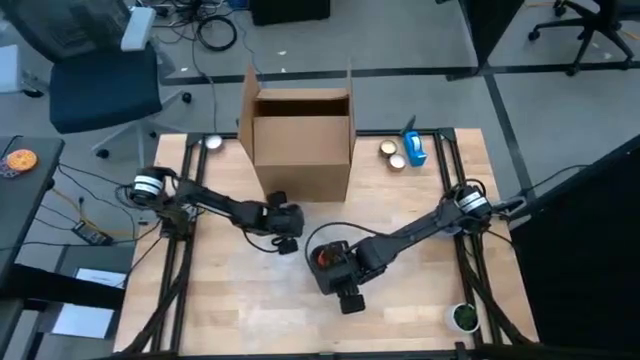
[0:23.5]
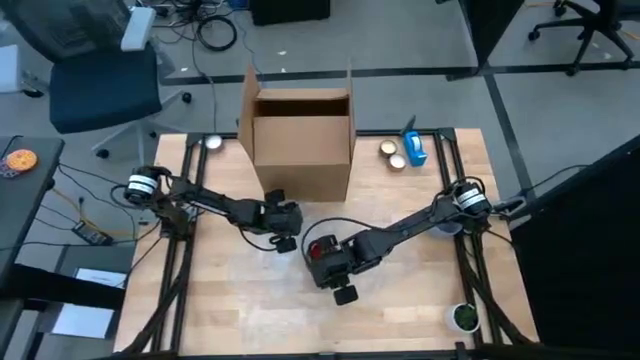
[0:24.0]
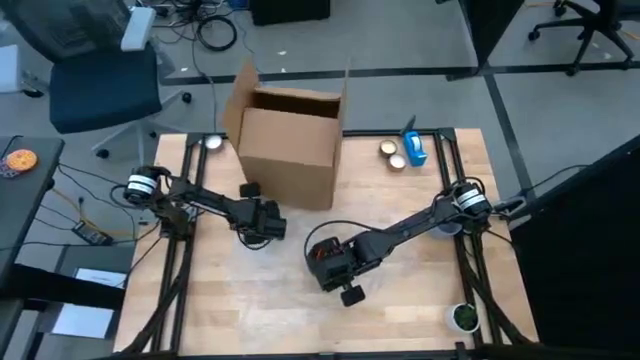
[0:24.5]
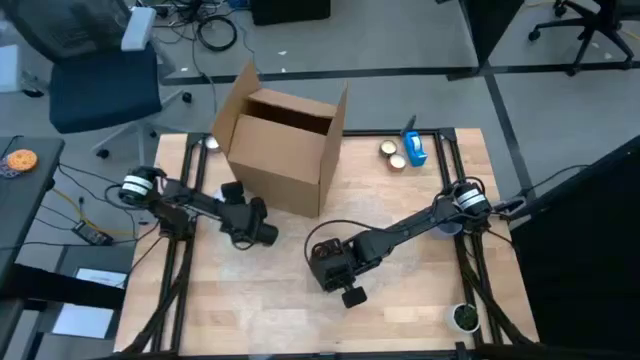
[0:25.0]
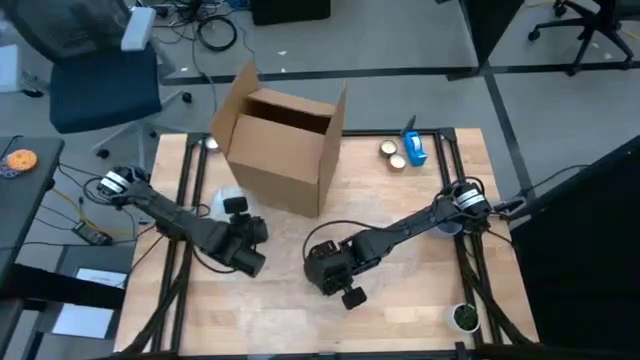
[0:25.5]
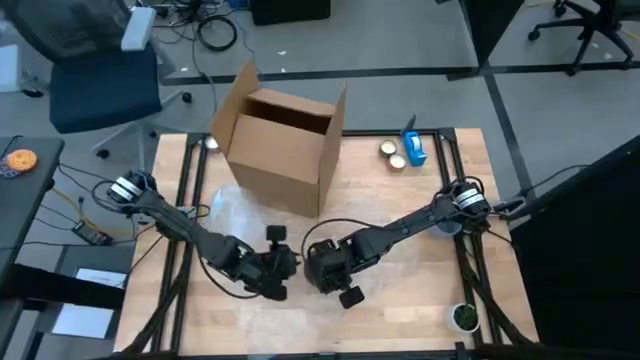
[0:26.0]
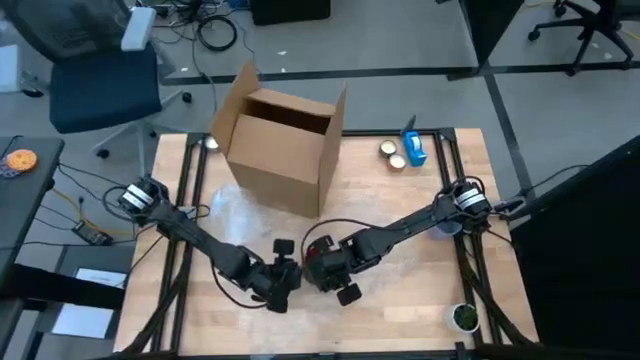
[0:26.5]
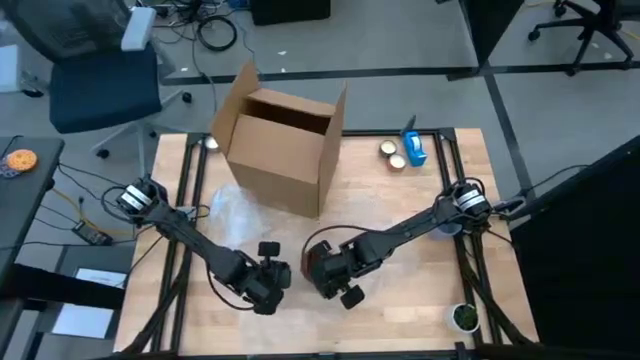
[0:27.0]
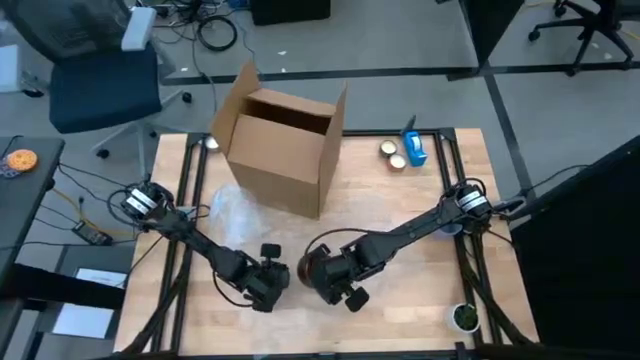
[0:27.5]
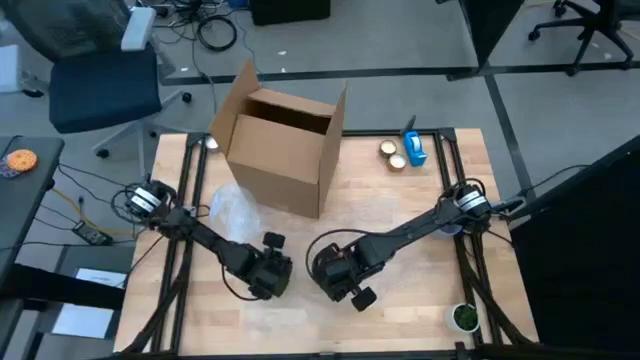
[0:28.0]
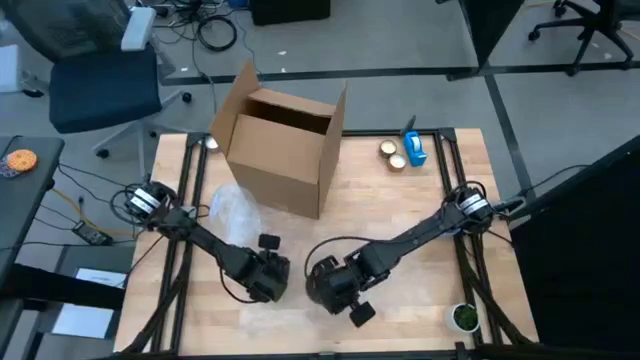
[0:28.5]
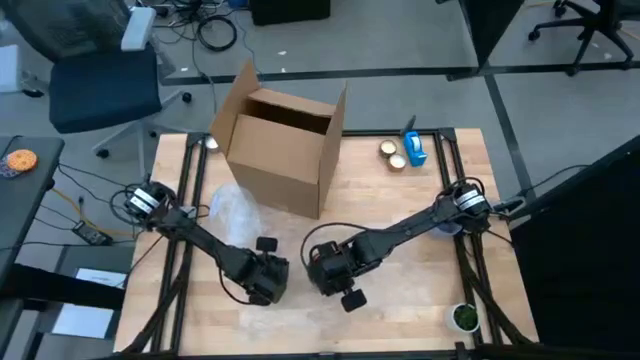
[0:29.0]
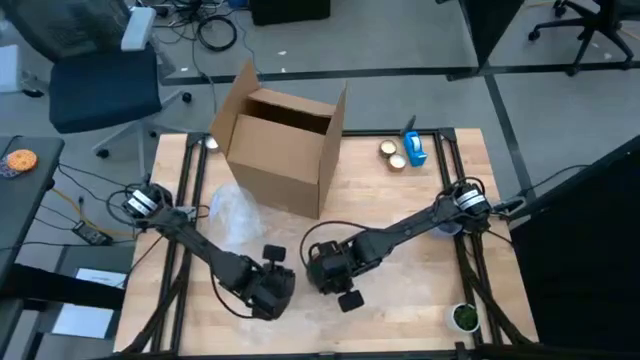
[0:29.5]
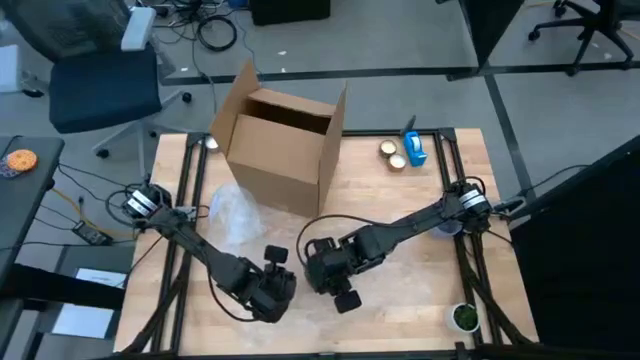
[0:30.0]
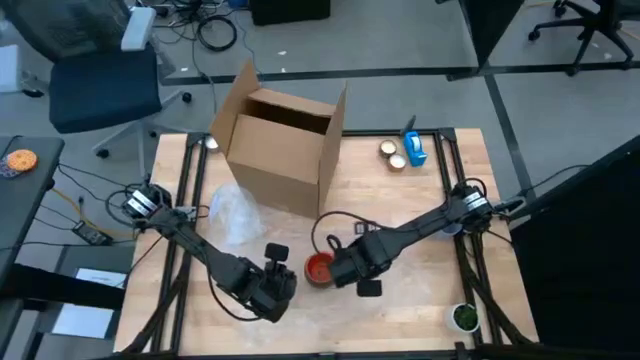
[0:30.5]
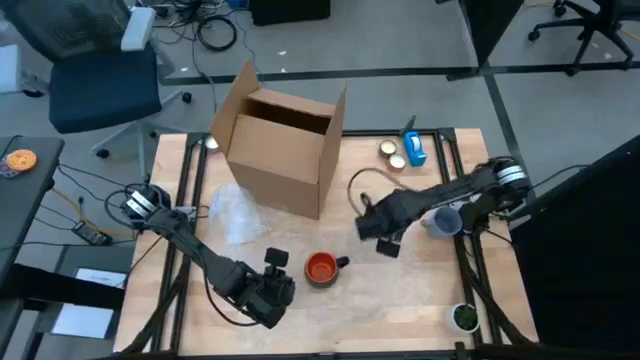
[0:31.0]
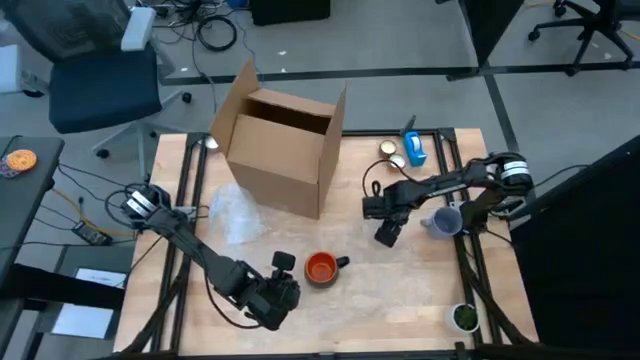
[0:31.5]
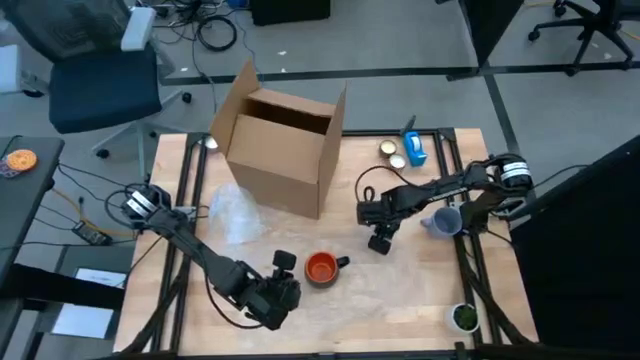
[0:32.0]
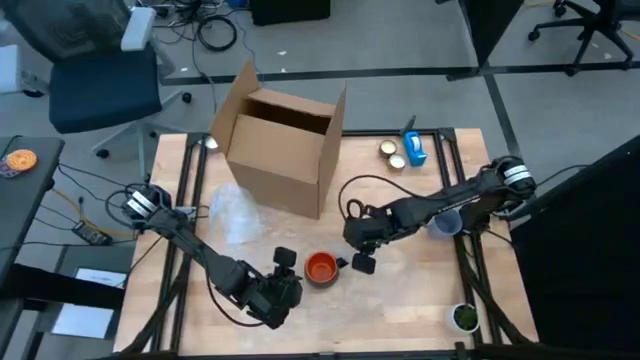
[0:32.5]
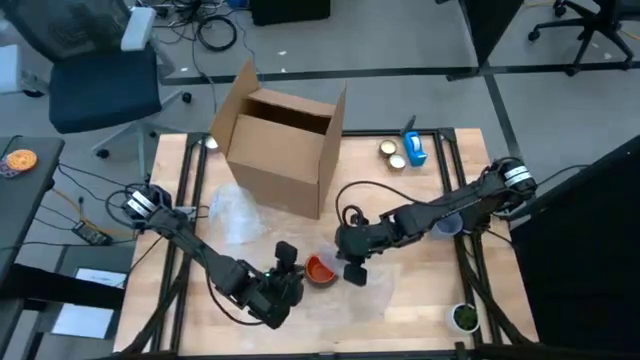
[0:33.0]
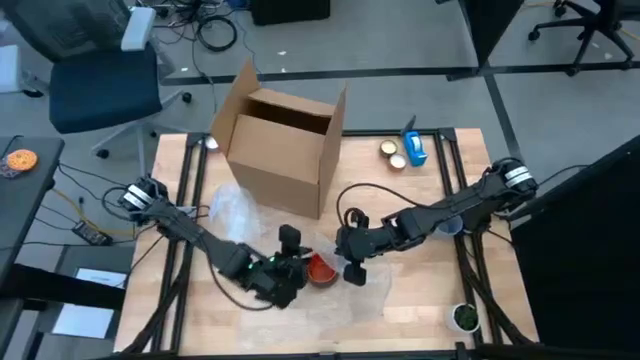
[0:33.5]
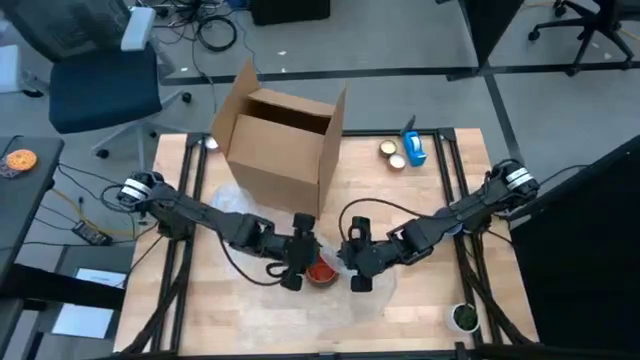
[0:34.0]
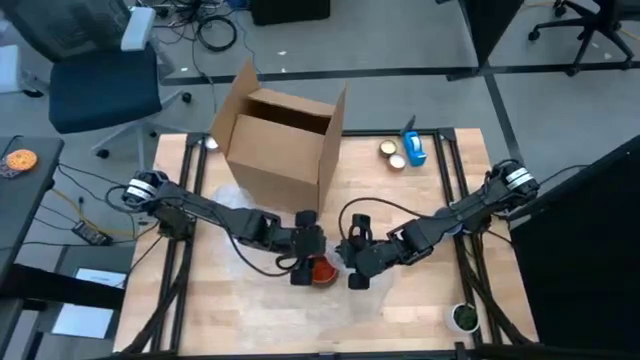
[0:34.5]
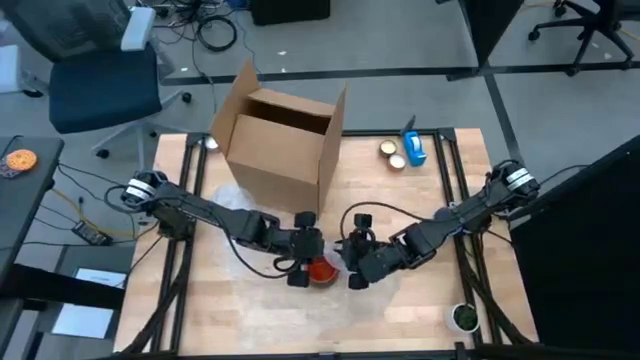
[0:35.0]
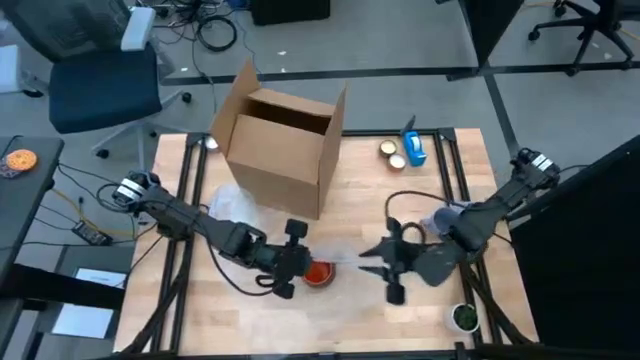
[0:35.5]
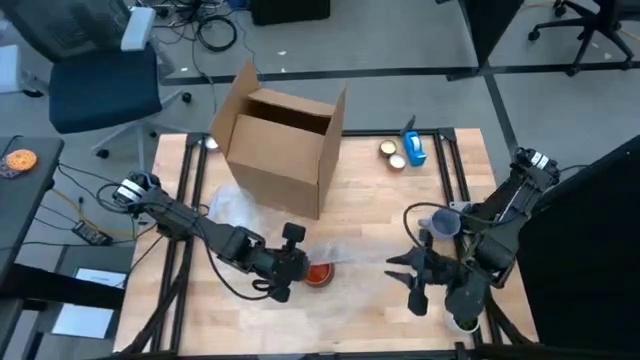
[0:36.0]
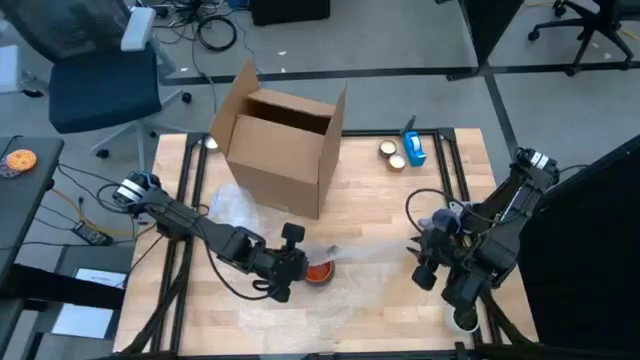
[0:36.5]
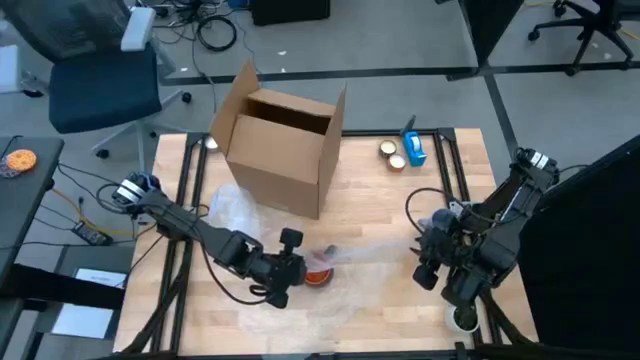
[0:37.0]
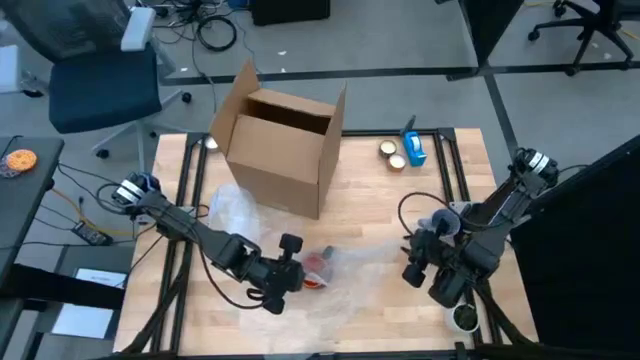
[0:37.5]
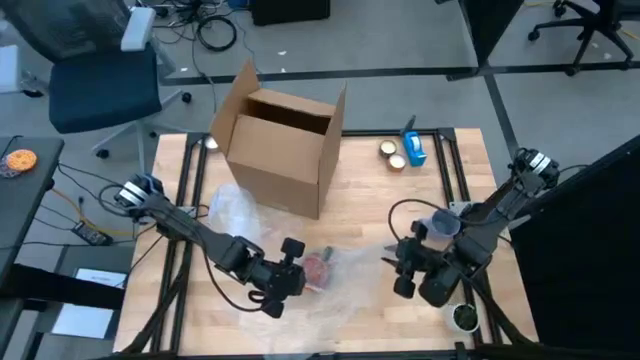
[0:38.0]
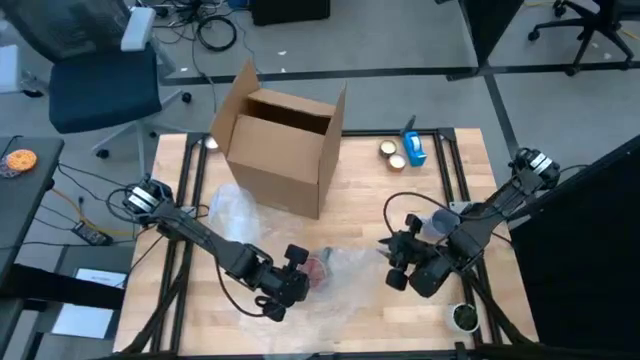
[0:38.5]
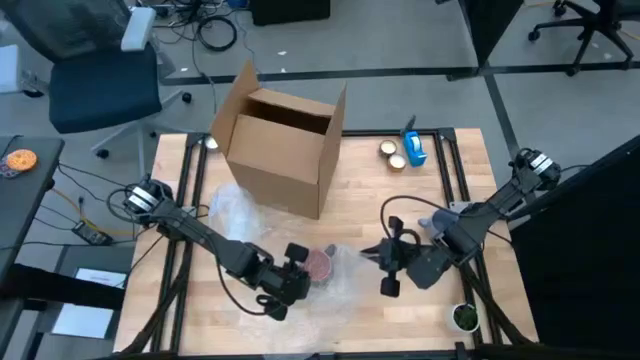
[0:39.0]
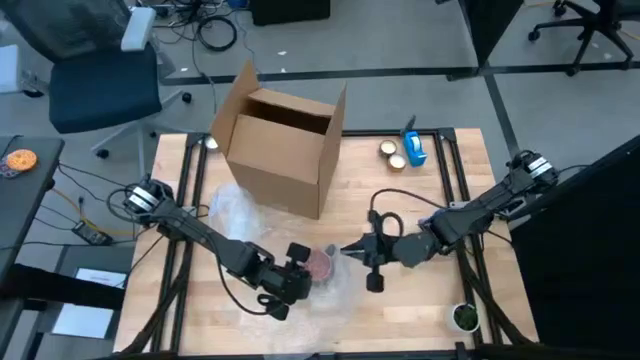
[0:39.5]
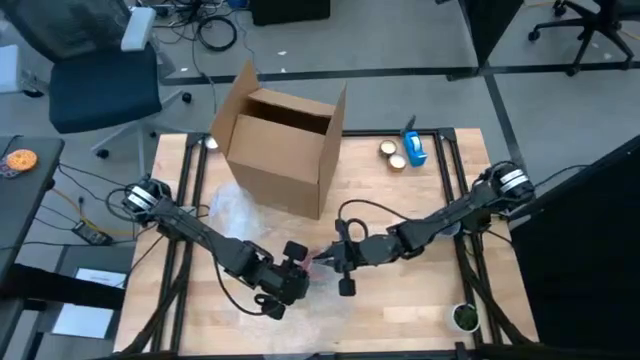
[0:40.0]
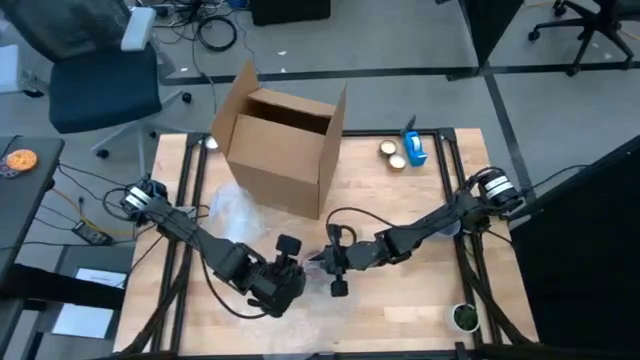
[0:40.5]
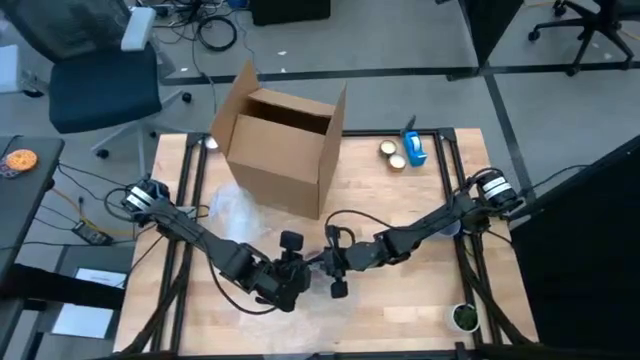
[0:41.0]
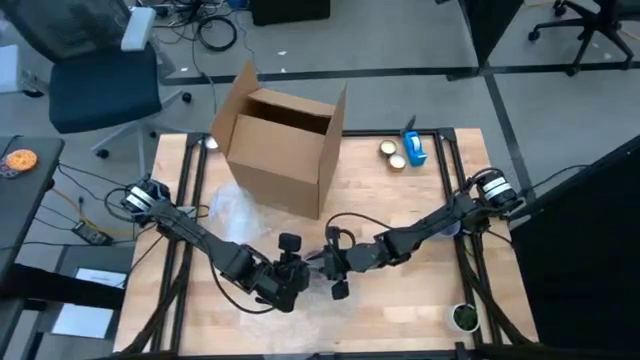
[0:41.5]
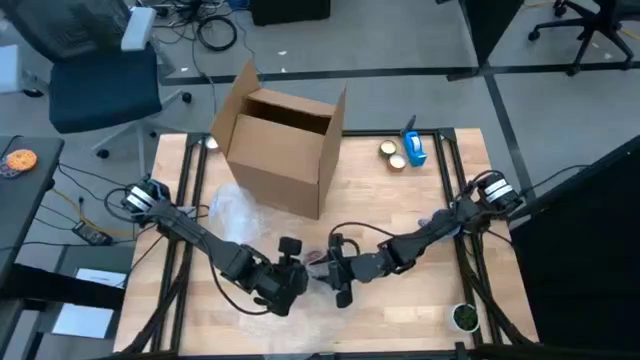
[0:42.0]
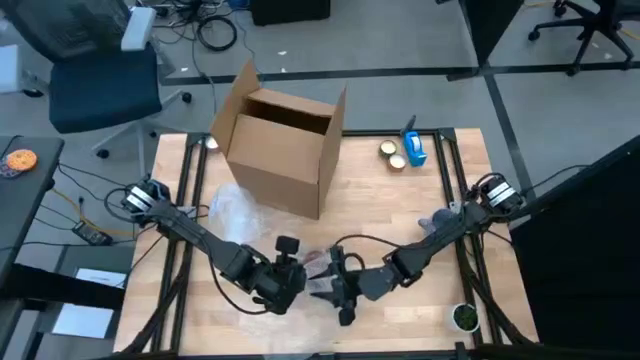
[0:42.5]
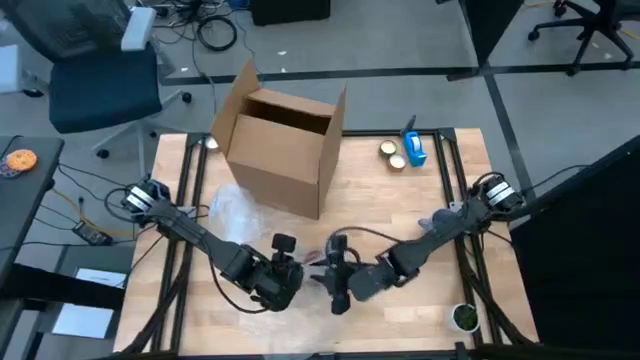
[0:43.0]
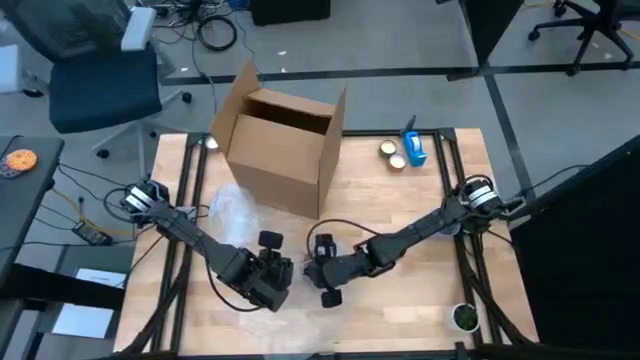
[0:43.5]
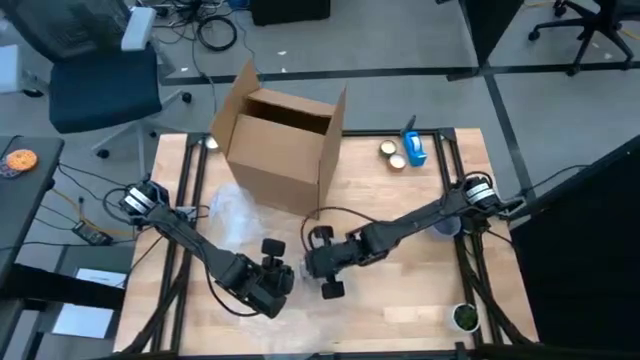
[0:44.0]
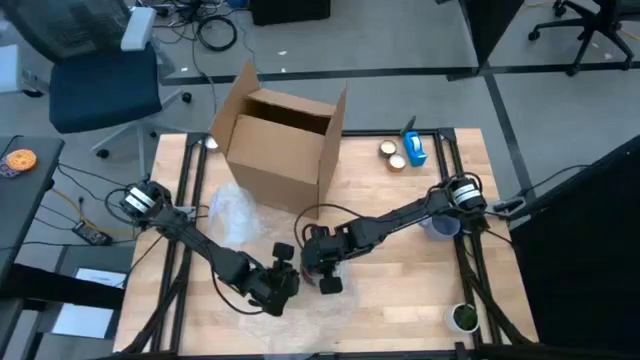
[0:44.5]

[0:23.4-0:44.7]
Task: wrap mug
Wrap the orange mug with bubble wrap
